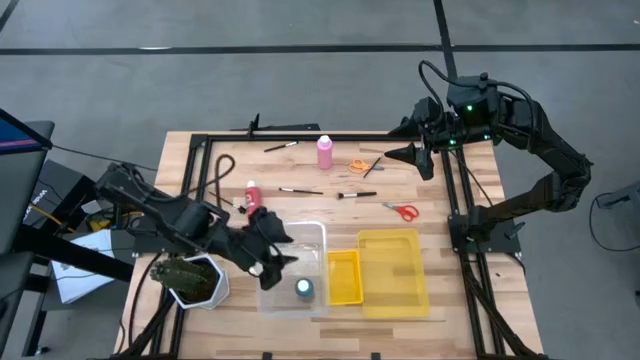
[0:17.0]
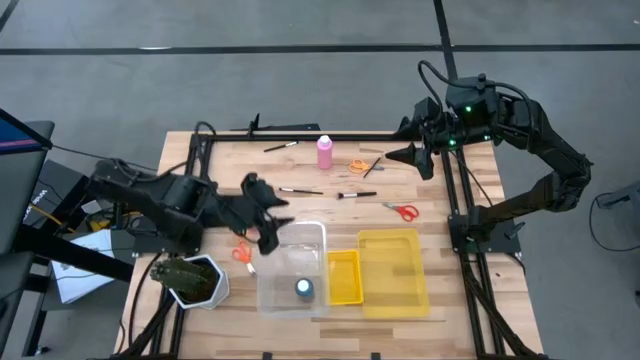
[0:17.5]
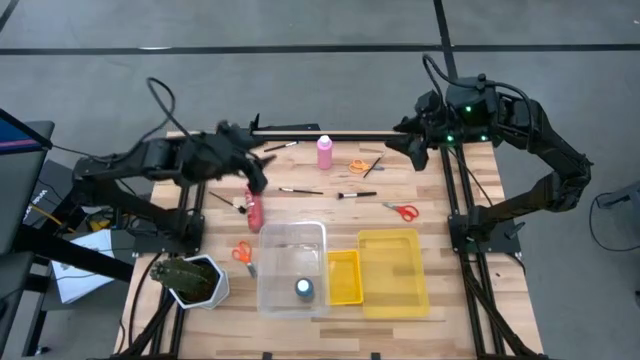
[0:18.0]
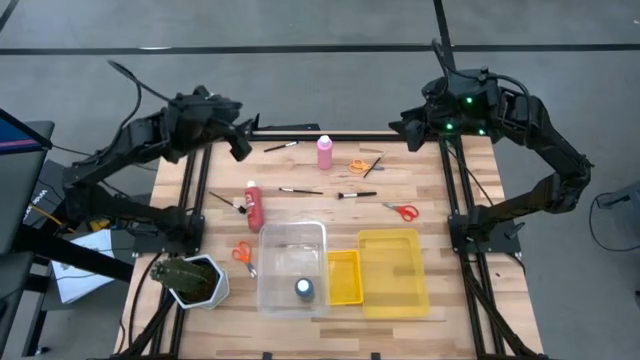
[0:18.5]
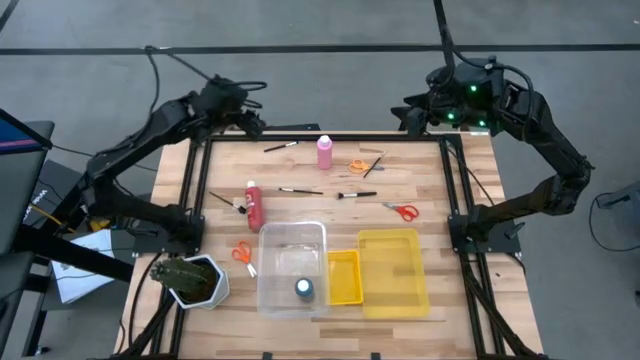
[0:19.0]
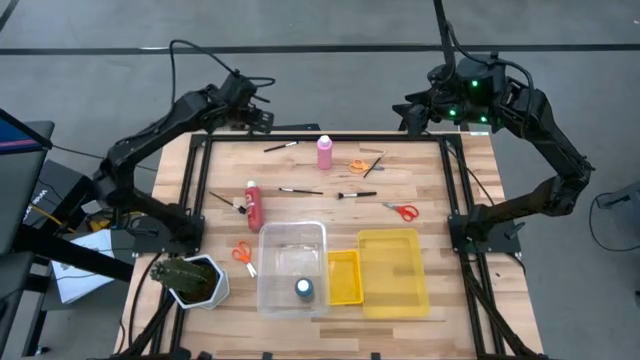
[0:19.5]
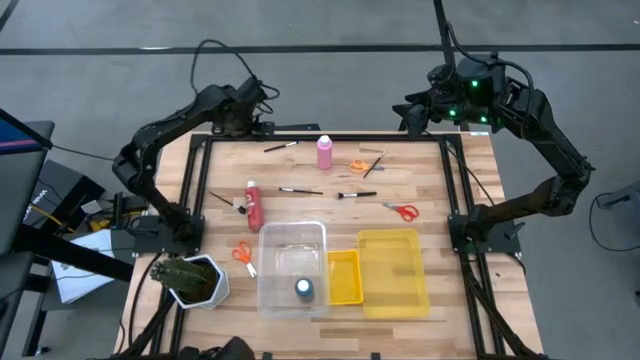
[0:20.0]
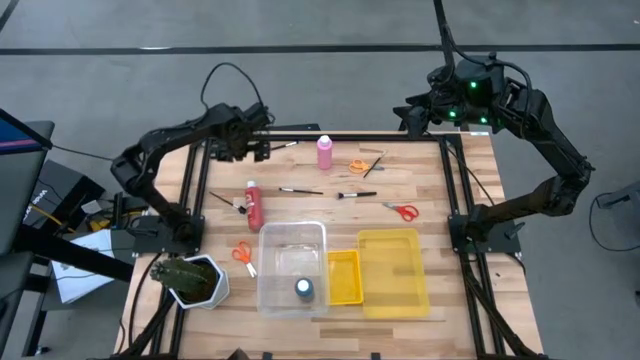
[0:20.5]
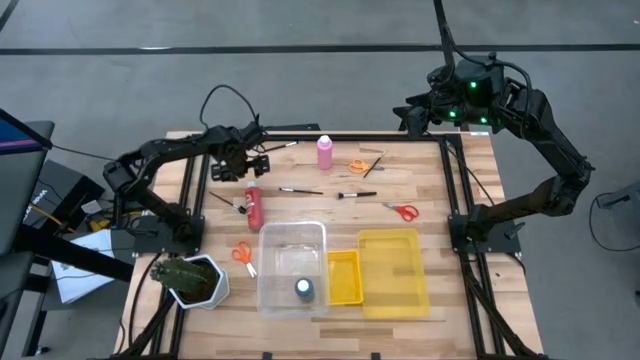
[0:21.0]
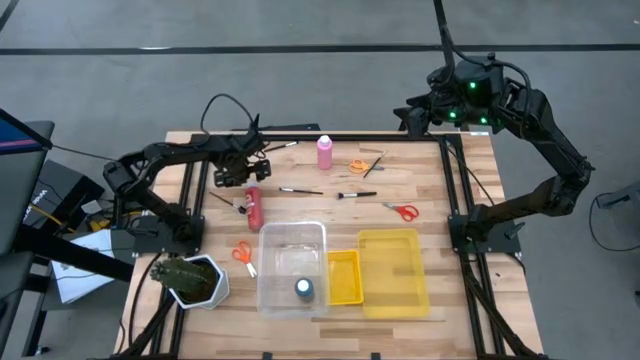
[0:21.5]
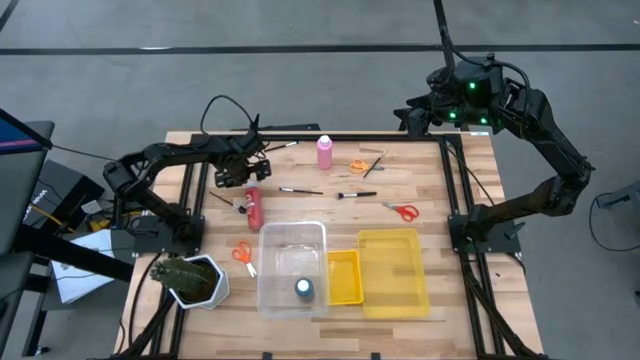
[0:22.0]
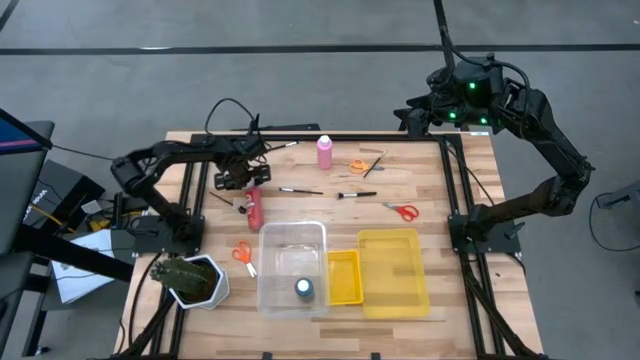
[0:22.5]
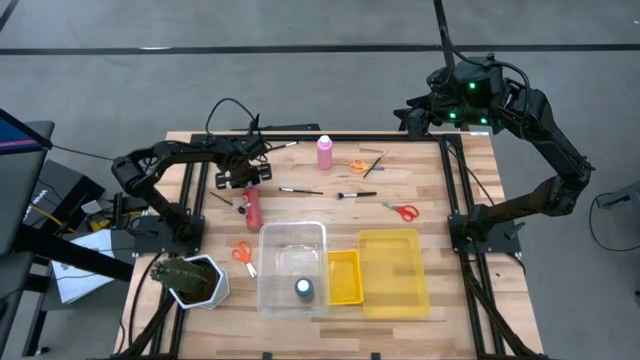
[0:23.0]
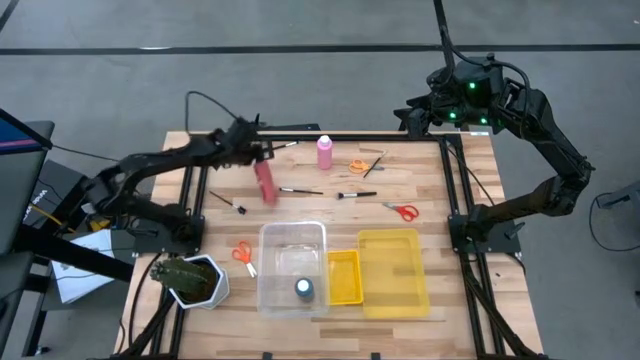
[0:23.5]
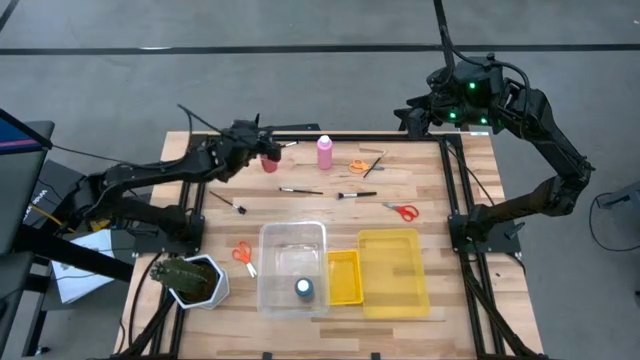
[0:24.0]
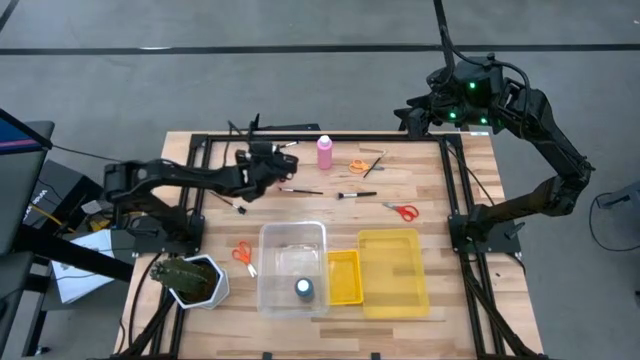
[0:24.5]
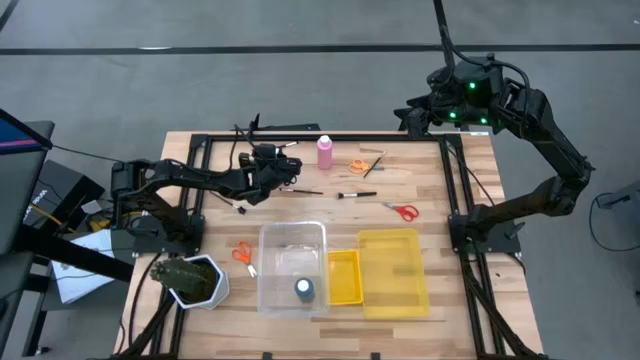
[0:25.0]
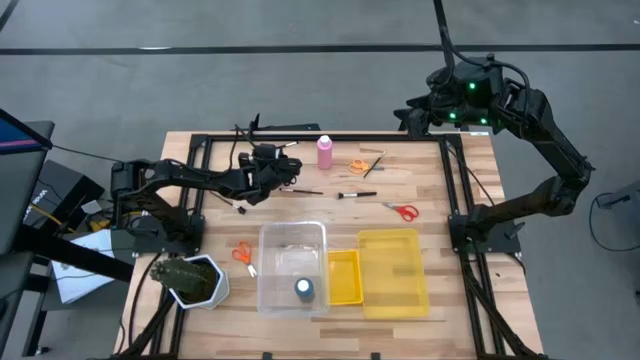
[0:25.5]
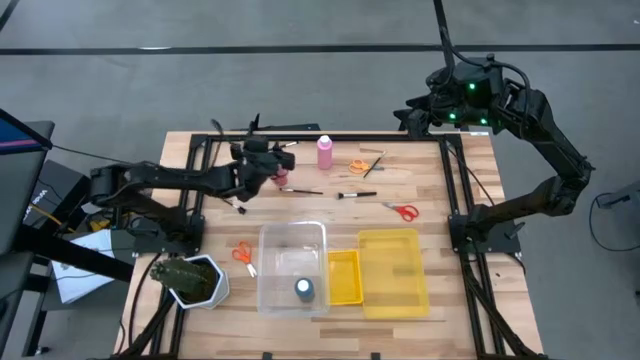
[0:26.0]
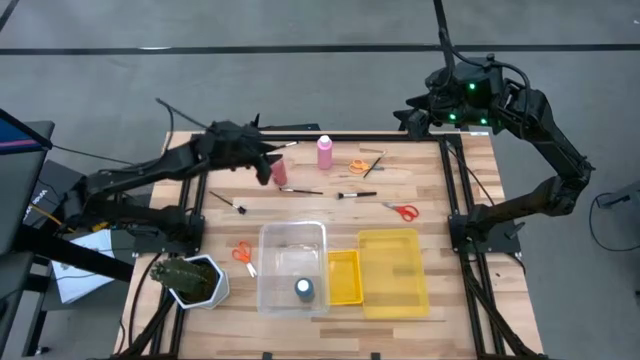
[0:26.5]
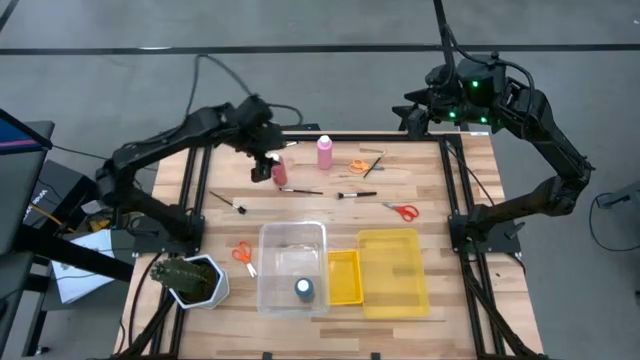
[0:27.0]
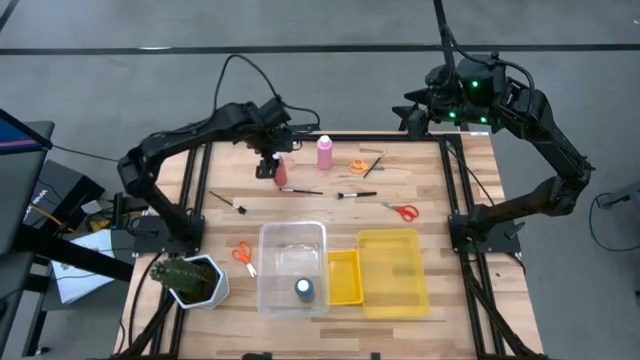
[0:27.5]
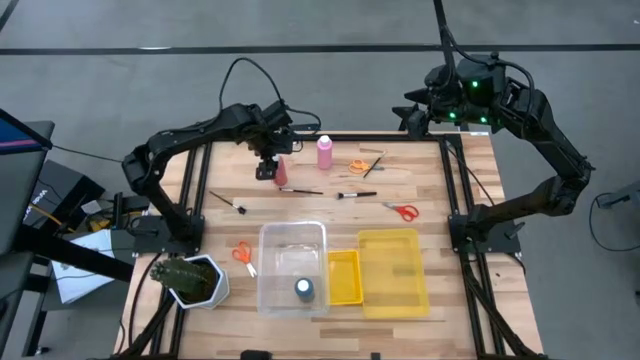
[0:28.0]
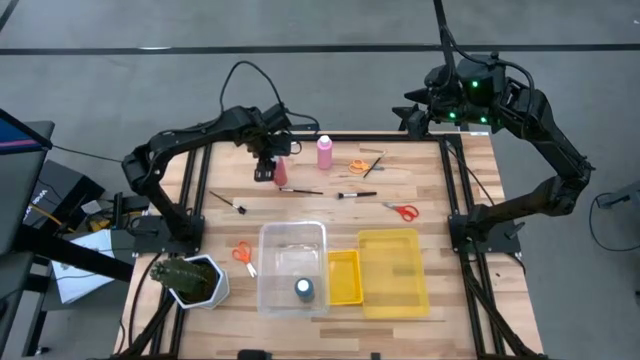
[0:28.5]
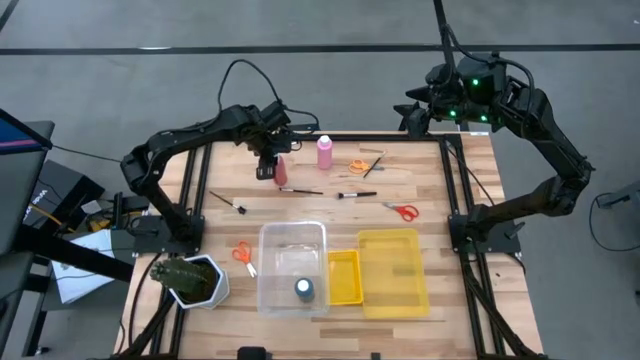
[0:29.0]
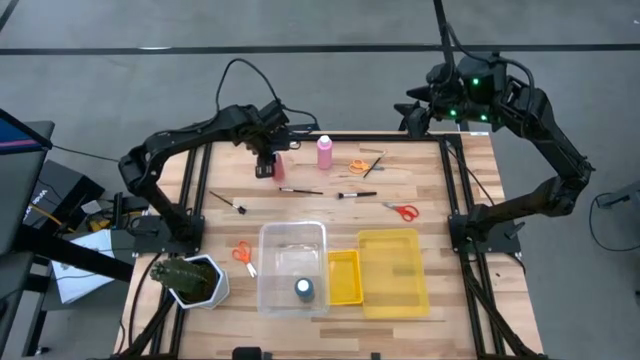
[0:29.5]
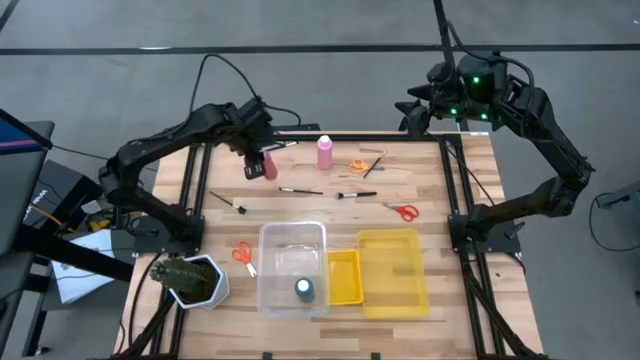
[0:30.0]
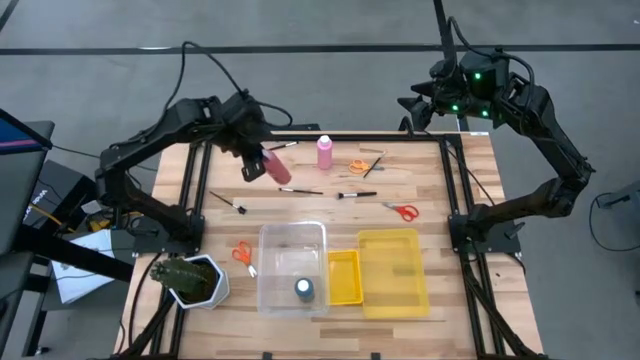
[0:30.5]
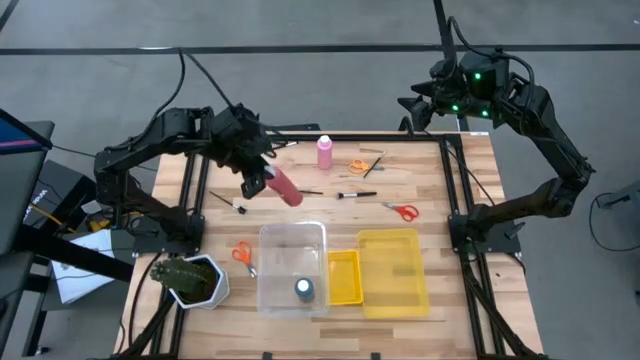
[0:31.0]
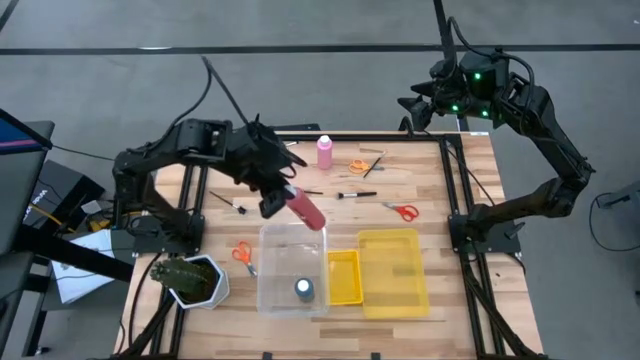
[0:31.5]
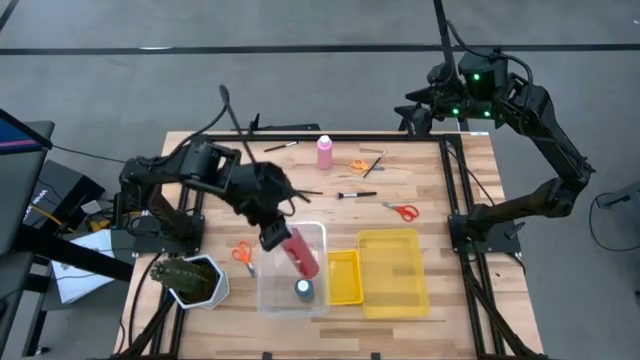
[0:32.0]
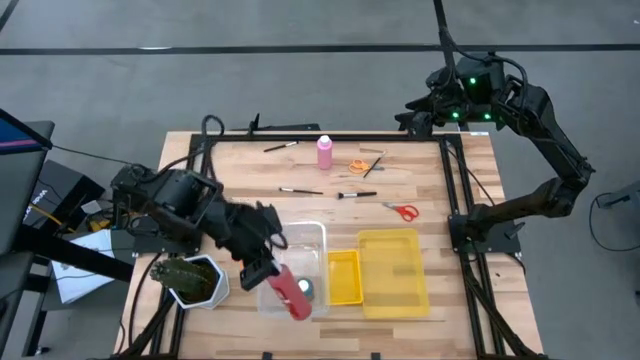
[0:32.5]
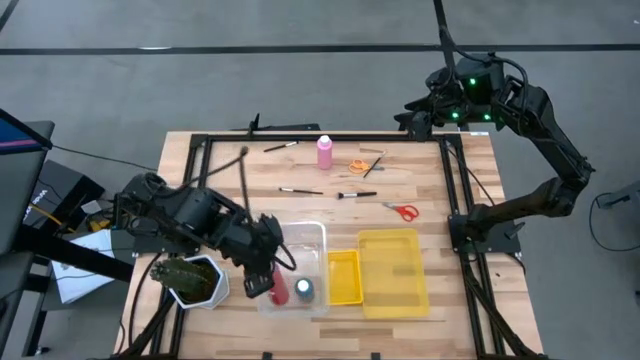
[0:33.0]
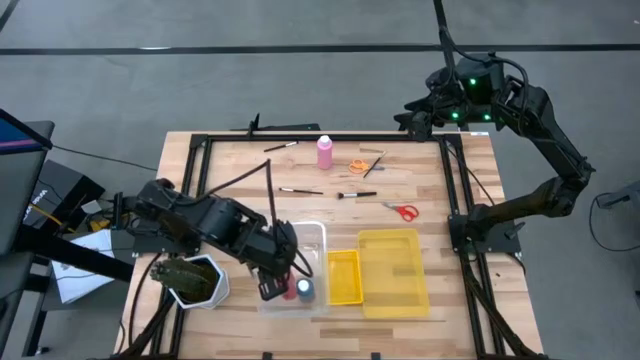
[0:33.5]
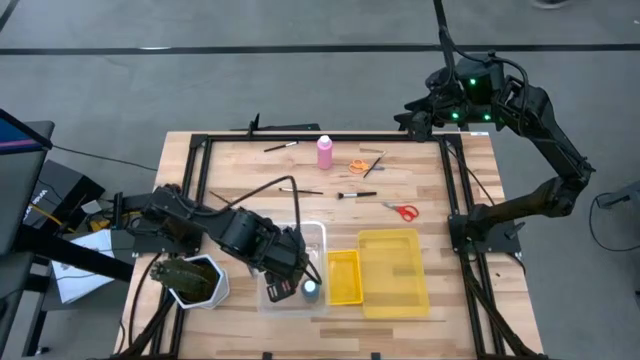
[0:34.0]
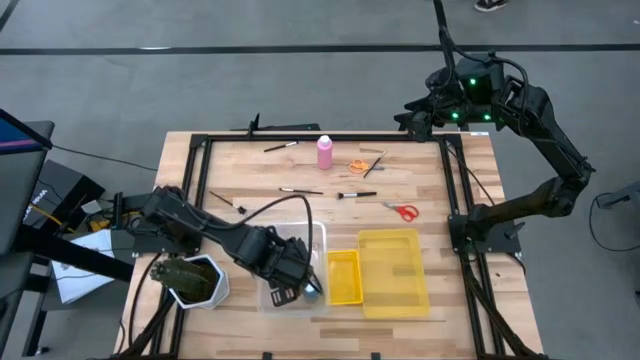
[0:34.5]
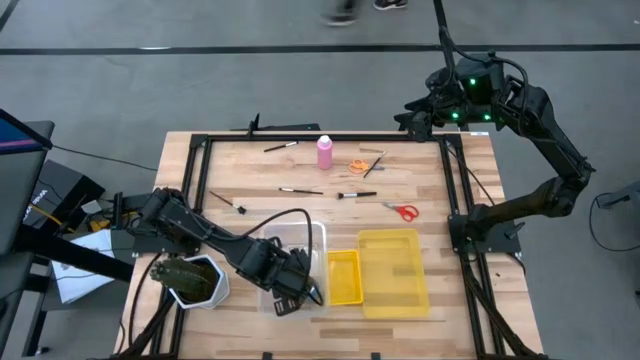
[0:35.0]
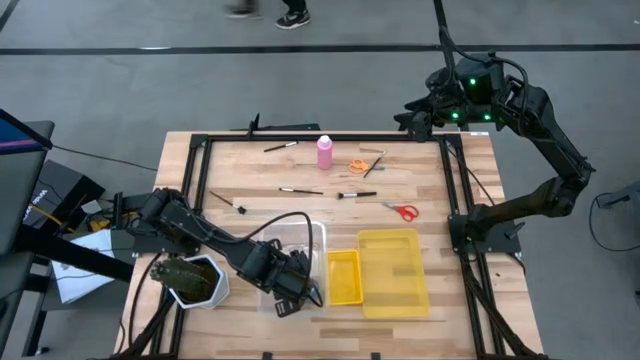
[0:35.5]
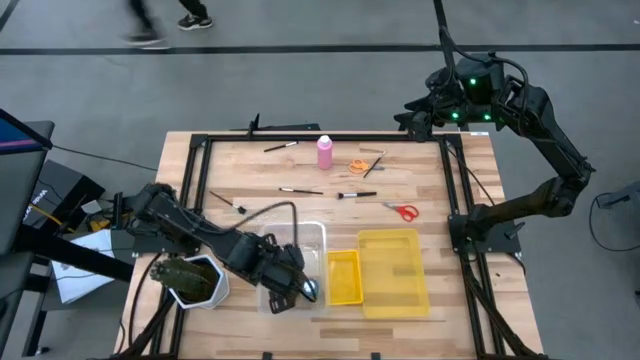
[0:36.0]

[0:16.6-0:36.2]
Task: Pick & Place Paint Supplies
Put the red paint bottle into the transparent bin
